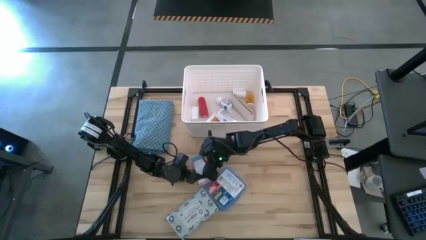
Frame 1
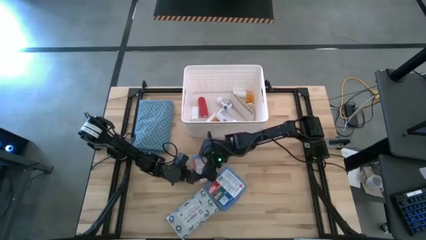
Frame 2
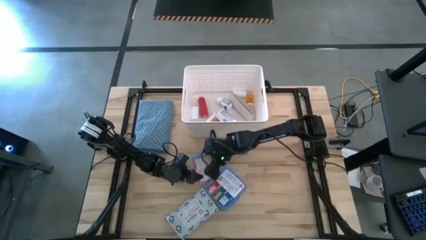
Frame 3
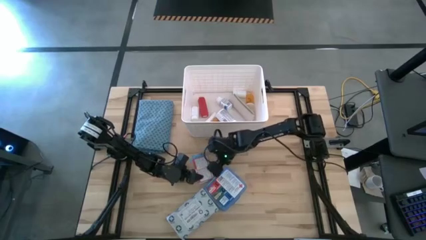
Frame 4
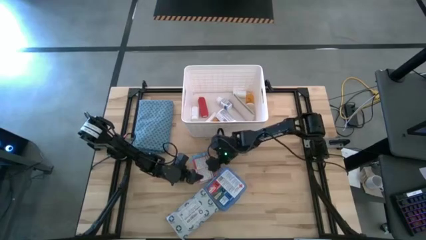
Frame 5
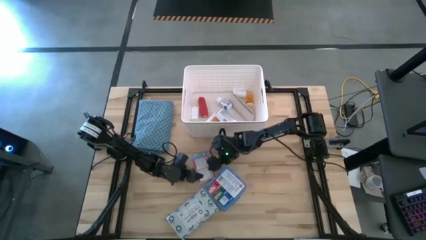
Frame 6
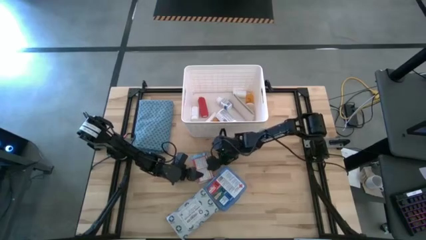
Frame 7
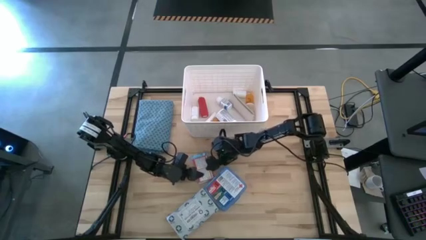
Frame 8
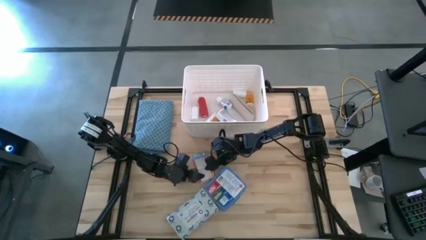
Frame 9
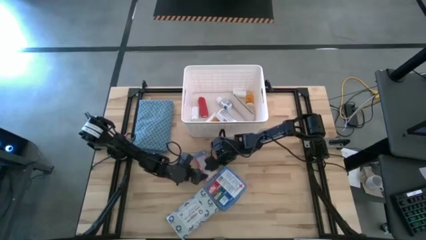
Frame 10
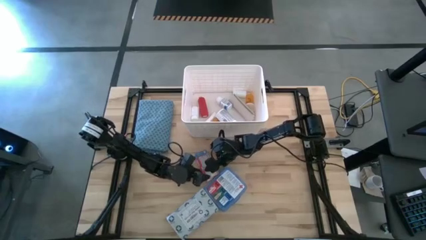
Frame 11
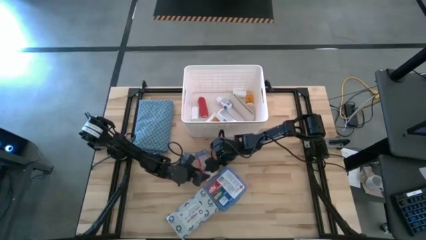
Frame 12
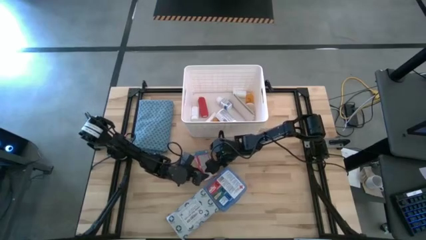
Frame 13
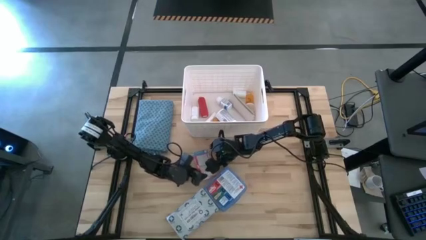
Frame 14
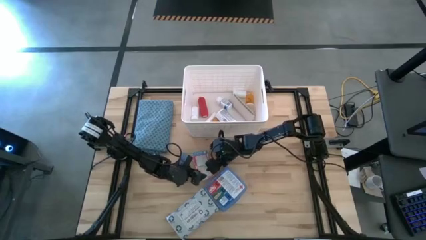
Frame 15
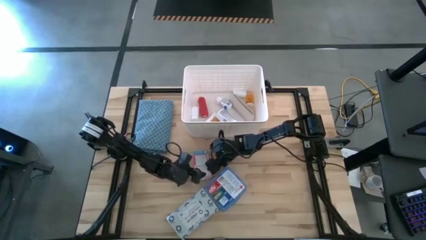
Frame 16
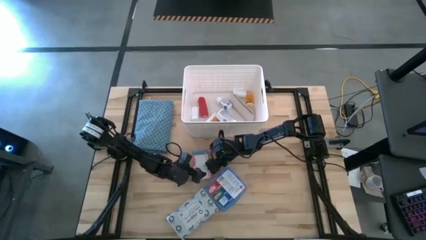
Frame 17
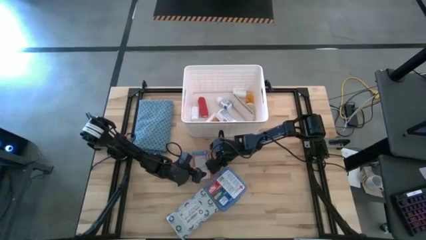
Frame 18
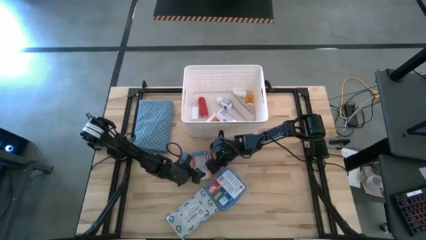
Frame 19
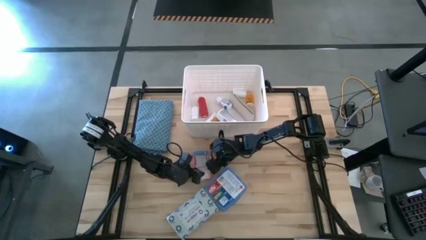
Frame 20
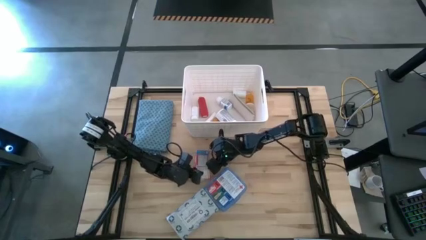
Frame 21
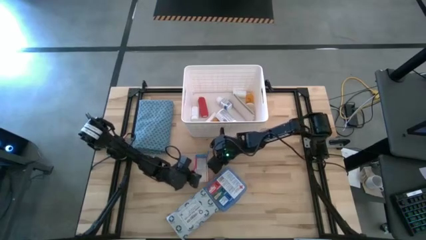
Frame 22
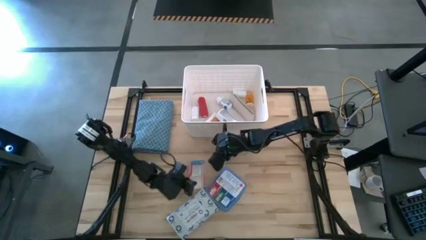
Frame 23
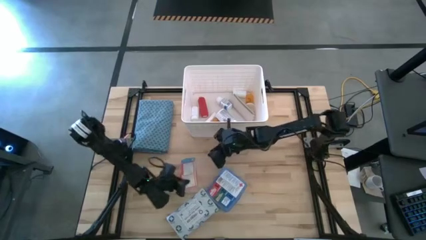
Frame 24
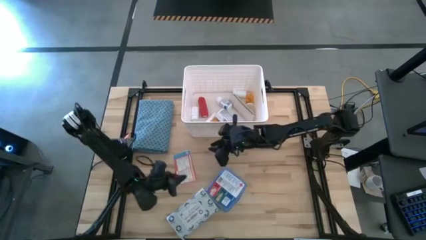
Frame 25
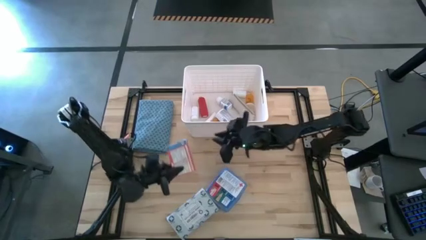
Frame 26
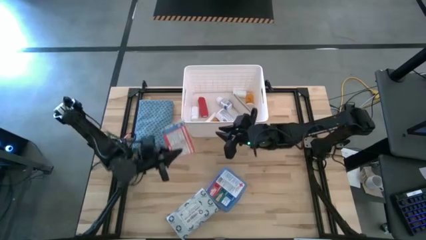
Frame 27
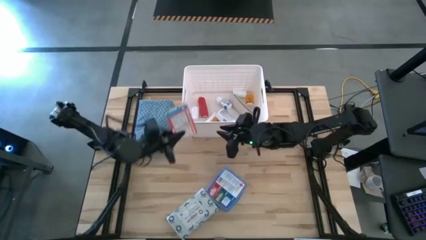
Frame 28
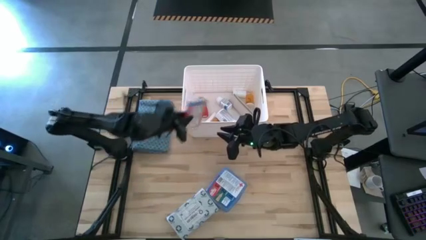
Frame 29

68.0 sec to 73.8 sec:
Task: Pick & place medical supplies in basket/bin
Put the red medicine box into the white bin

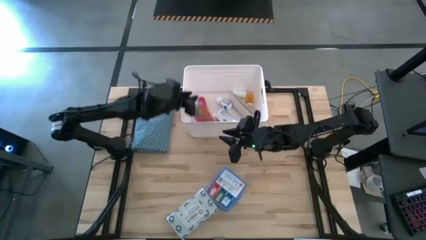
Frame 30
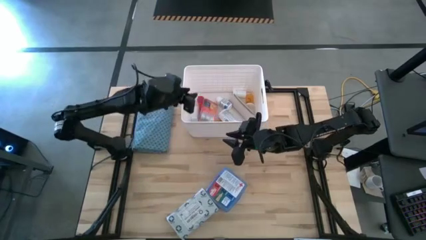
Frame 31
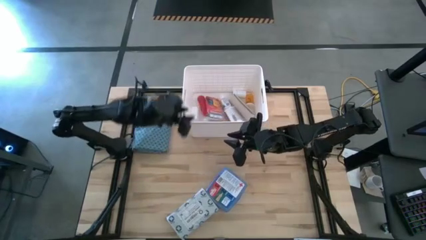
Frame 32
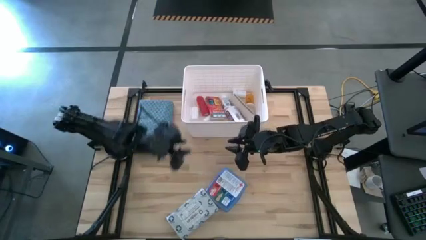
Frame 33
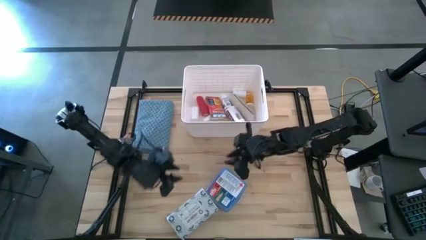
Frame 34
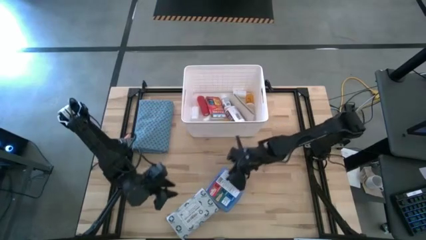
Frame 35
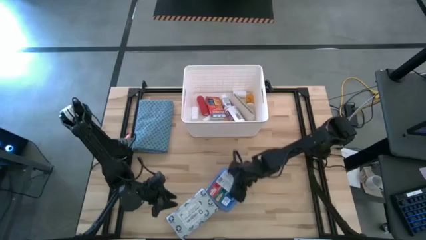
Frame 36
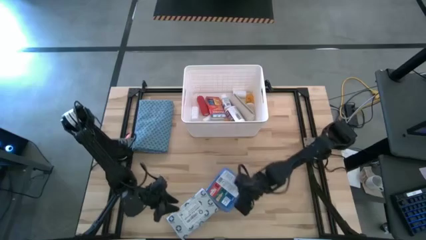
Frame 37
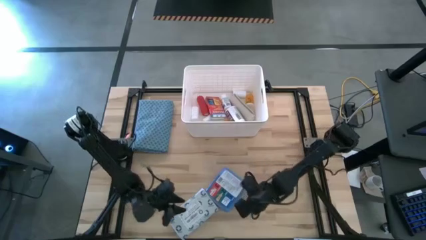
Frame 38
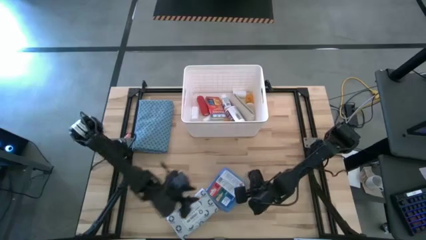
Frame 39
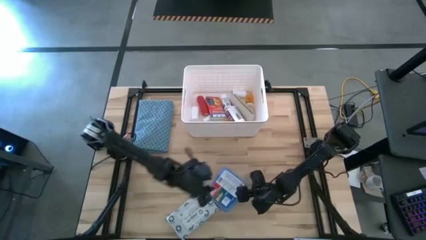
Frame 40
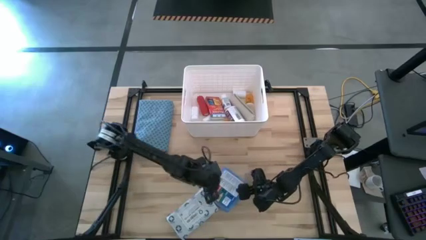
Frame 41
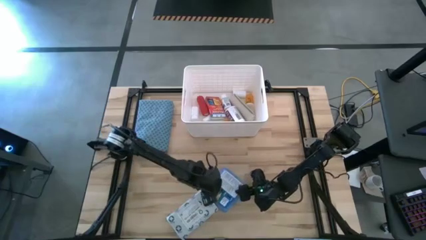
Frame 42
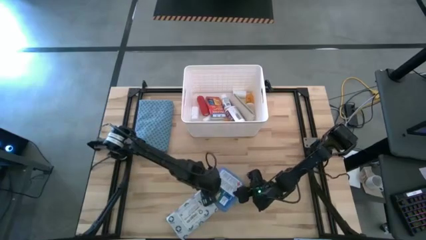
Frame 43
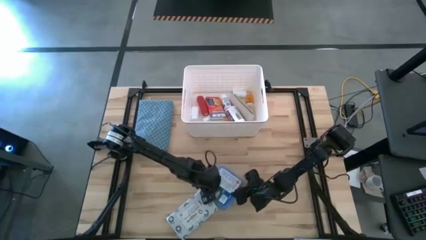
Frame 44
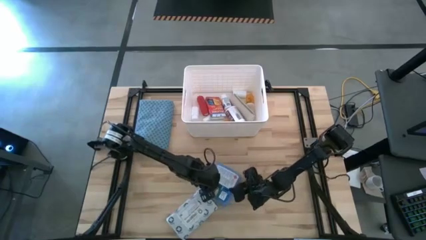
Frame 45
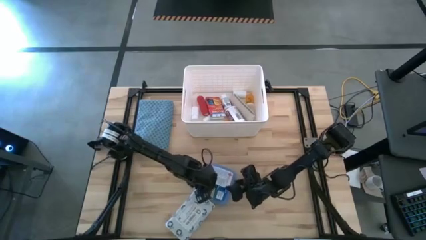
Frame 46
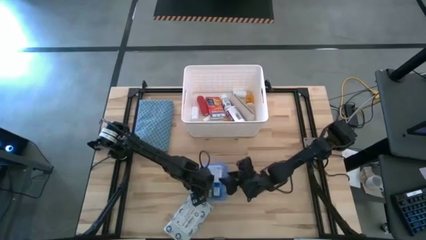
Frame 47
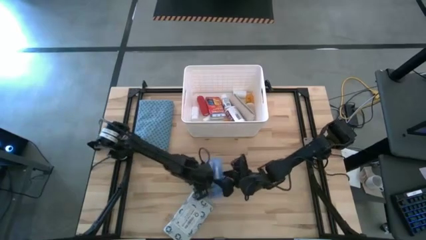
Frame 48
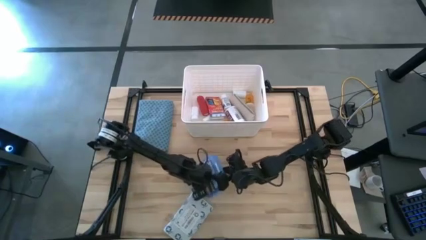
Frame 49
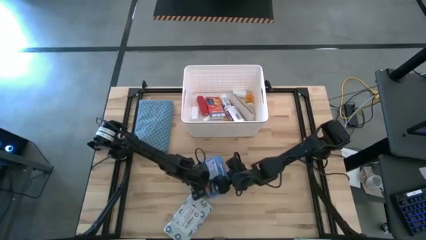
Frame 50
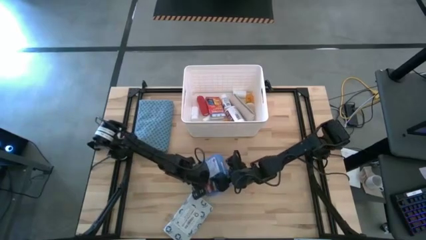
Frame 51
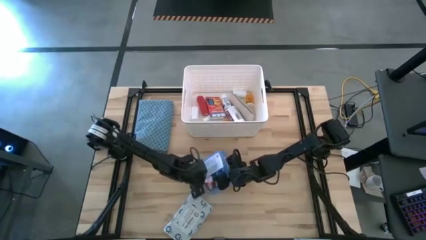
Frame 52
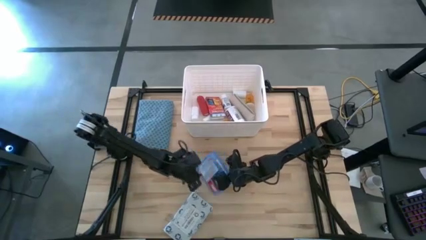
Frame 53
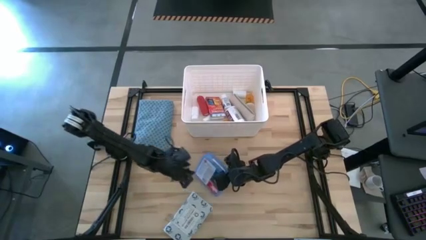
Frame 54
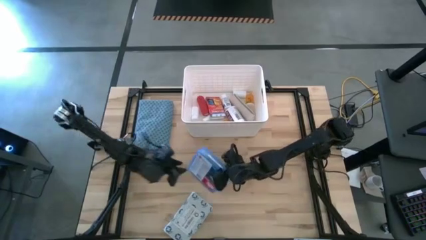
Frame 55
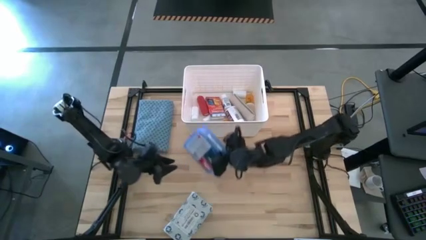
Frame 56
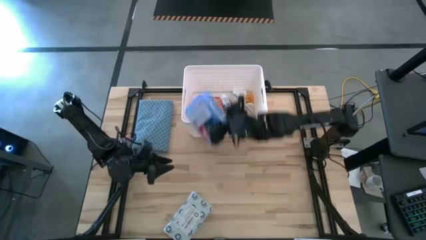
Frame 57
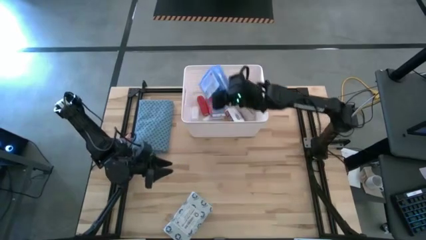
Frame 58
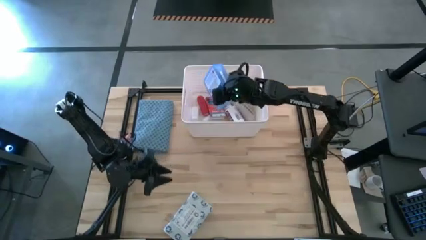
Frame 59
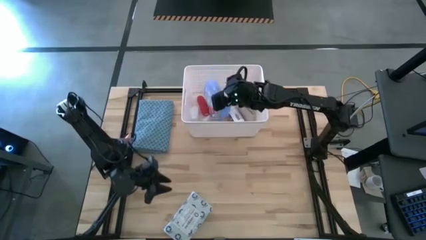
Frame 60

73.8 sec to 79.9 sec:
Put the blue first aid kit into the white bin

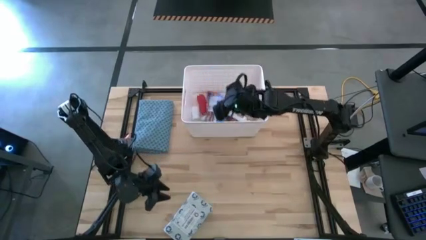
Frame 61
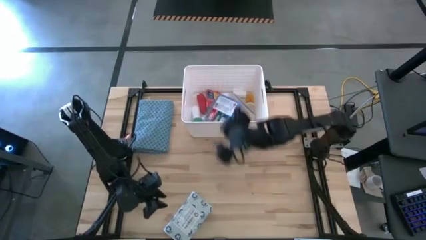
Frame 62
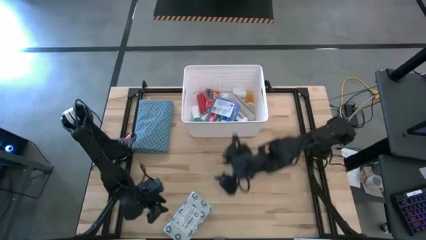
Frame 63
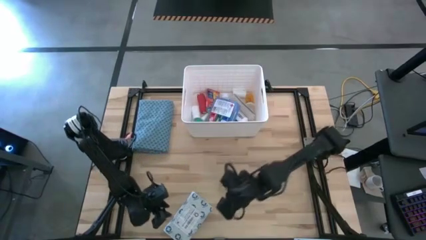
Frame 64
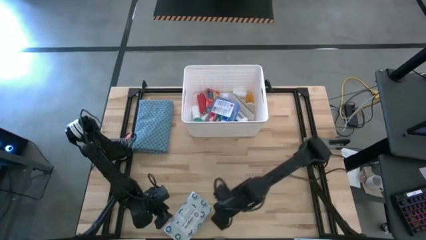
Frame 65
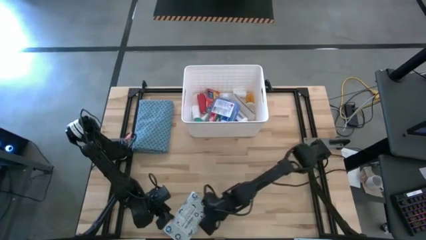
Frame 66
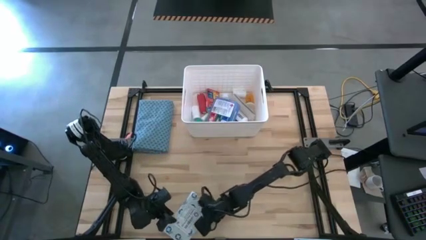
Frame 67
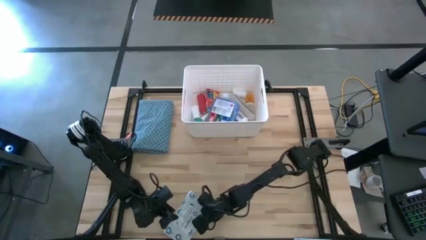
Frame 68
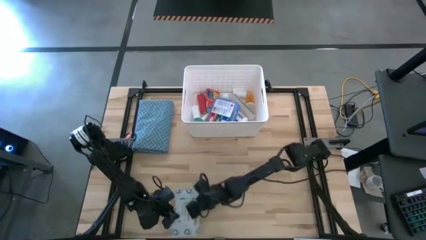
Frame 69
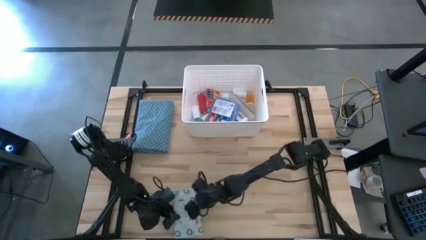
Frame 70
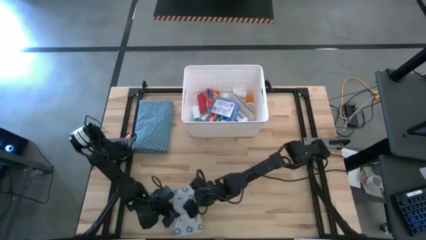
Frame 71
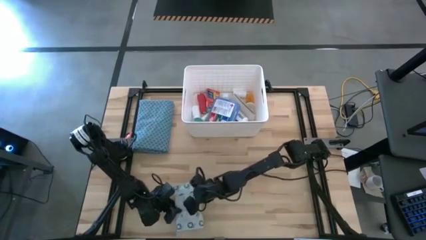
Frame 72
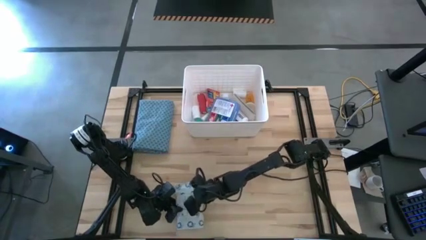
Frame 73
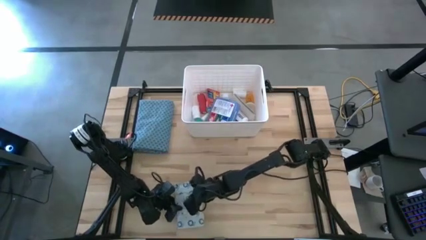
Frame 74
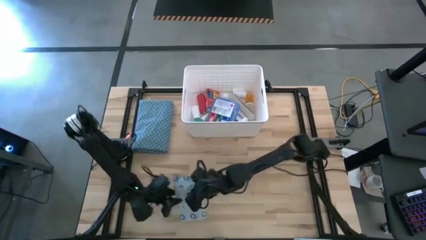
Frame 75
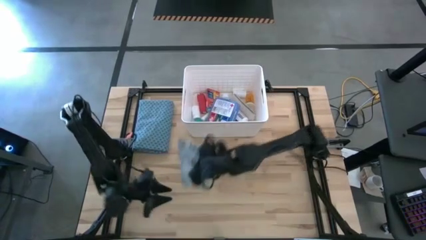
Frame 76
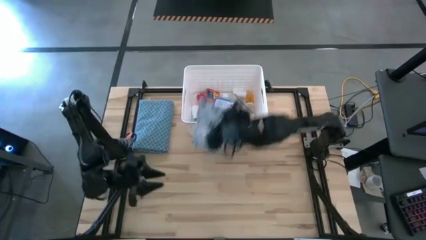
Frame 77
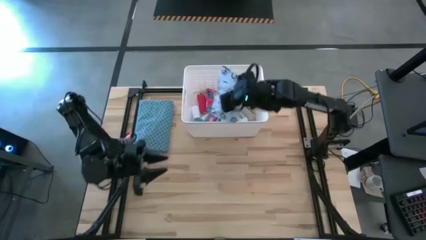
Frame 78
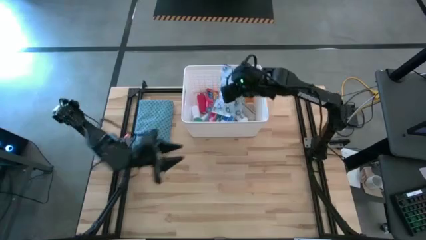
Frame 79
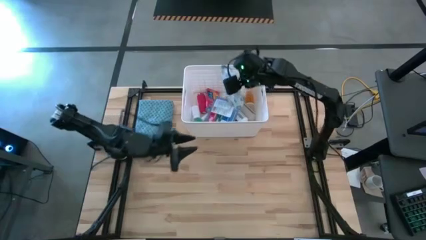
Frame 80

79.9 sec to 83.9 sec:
Put the mailer bag into the white bin

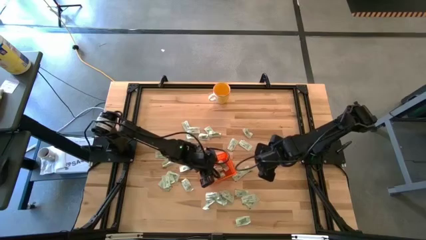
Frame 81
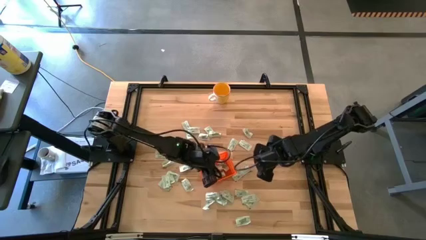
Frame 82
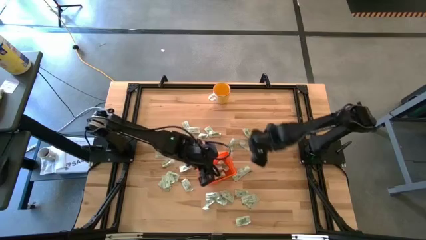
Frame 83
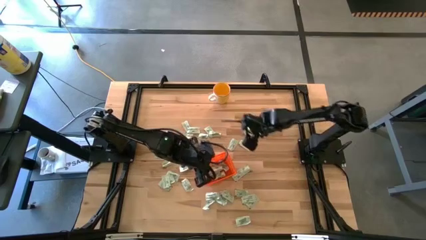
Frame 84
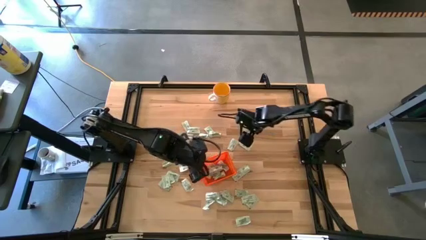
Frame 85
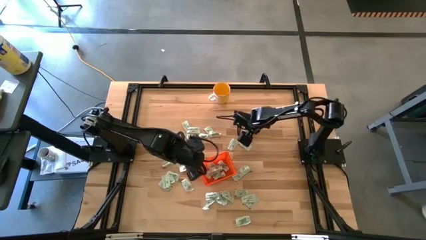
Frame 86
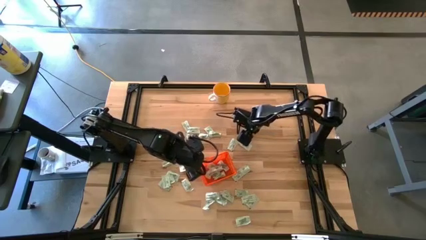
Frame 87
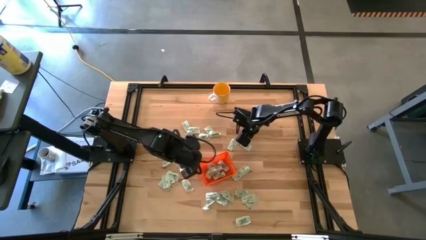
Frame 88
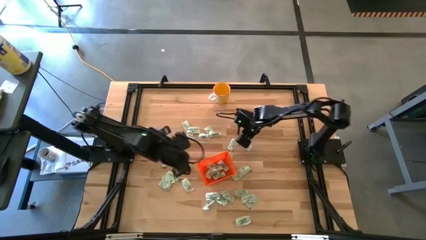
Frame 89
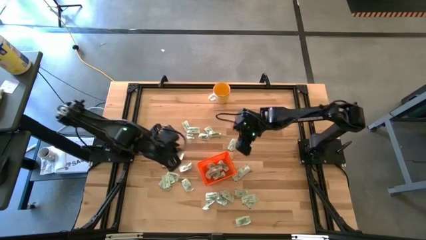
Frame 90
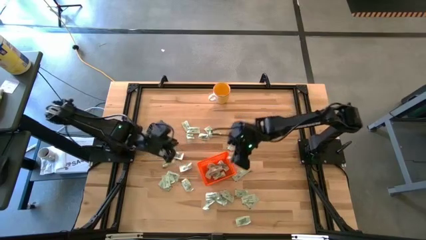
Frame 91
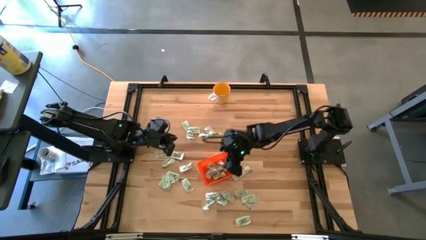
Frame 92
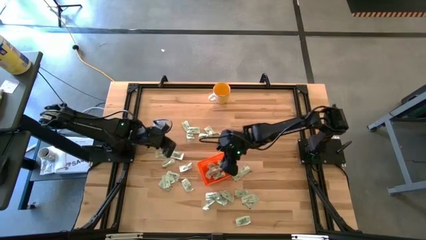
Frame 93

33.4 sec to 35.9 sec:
Task: Pick and place Stevia / Truvia into bins
Put the stevia packet into the bin
